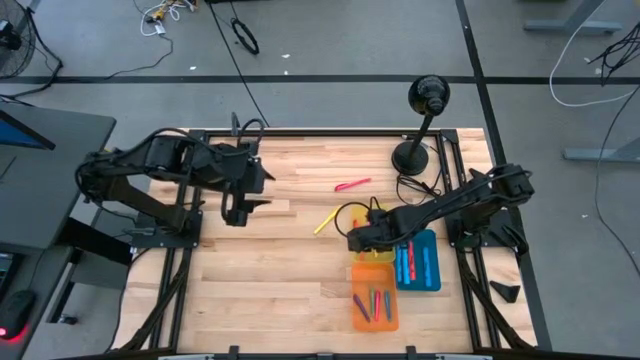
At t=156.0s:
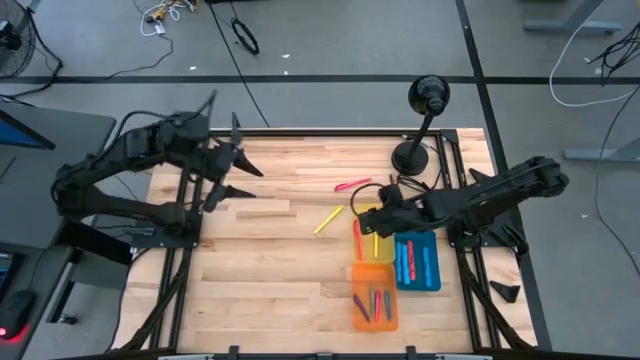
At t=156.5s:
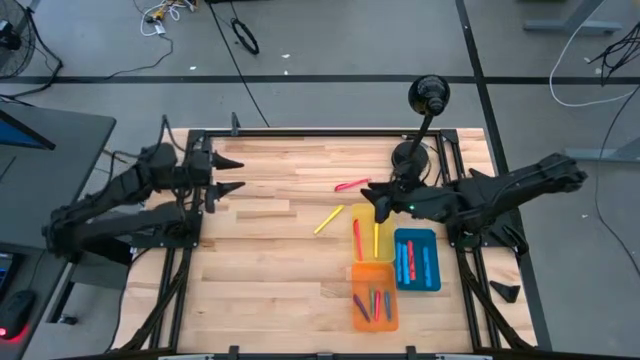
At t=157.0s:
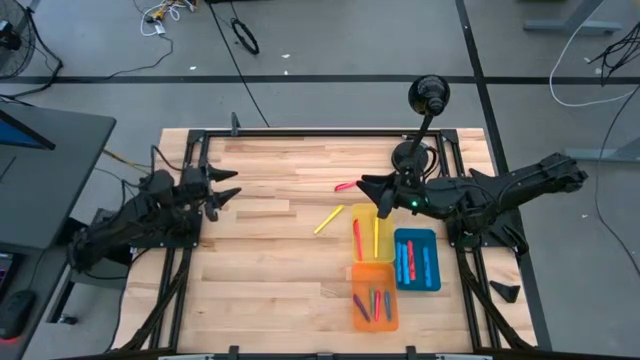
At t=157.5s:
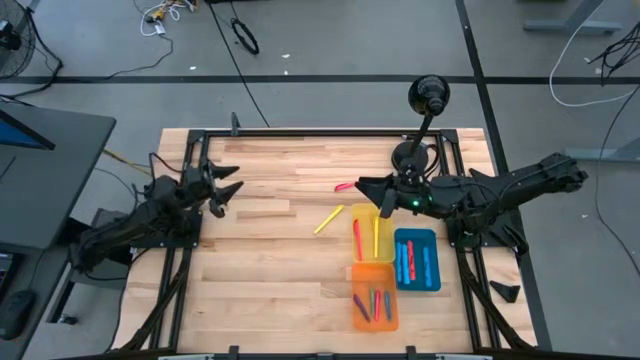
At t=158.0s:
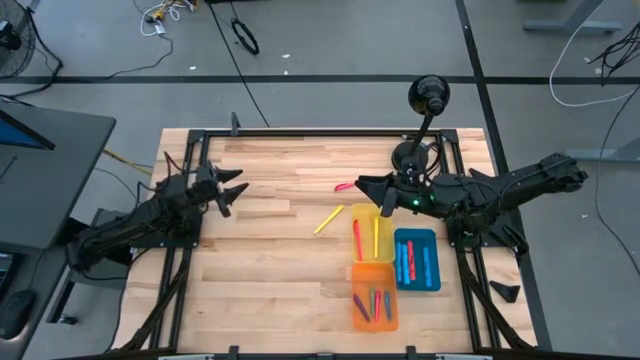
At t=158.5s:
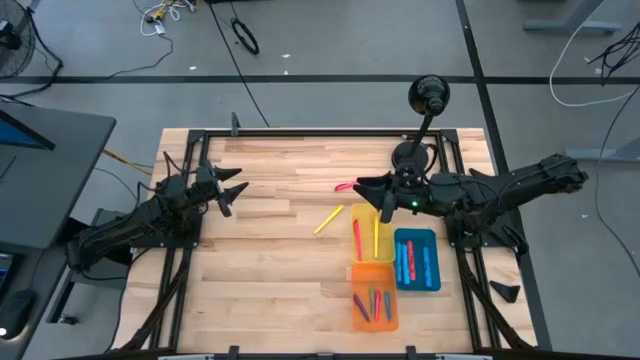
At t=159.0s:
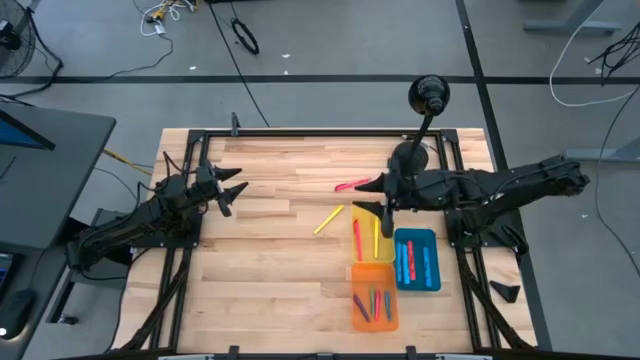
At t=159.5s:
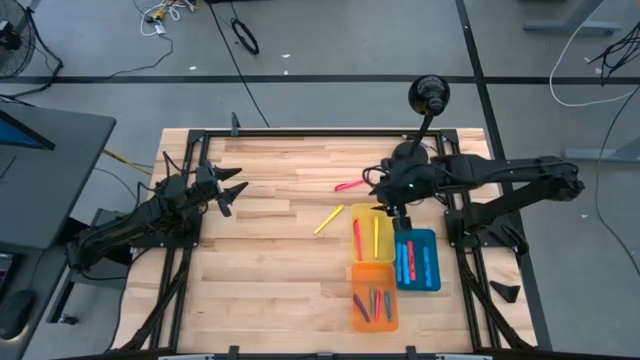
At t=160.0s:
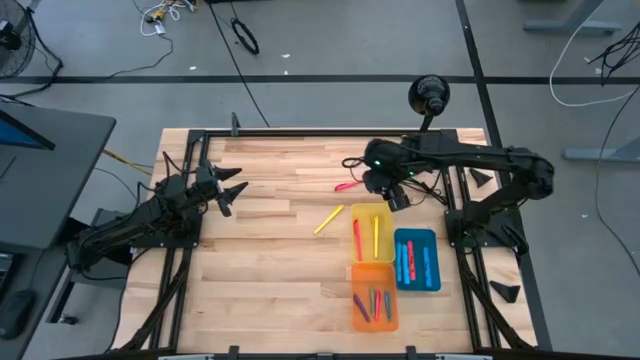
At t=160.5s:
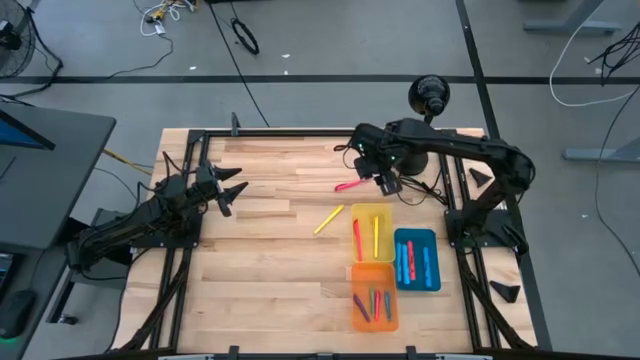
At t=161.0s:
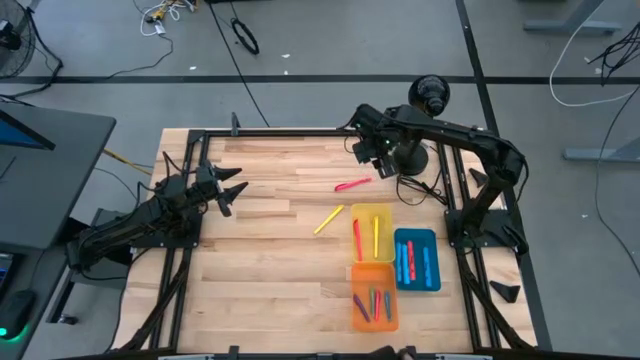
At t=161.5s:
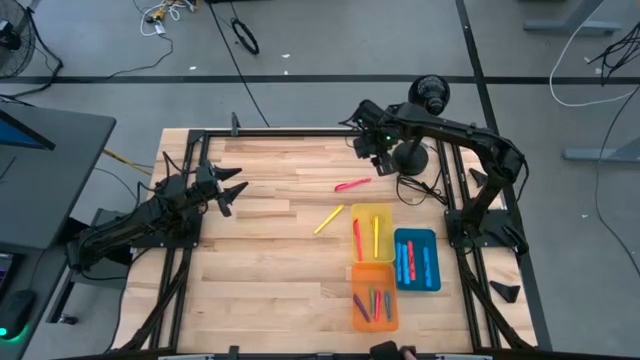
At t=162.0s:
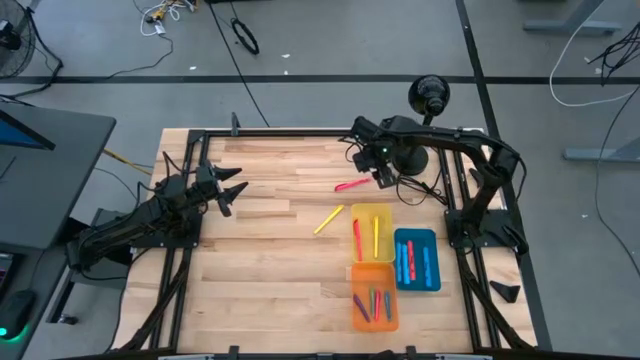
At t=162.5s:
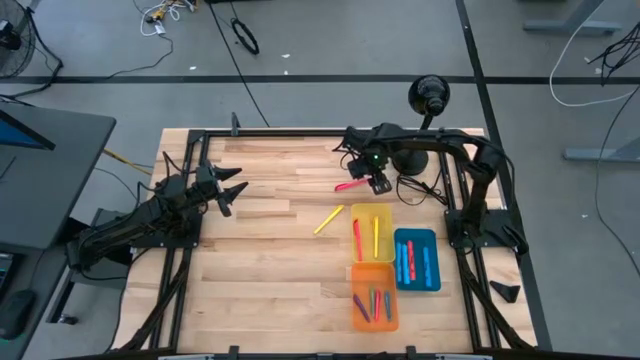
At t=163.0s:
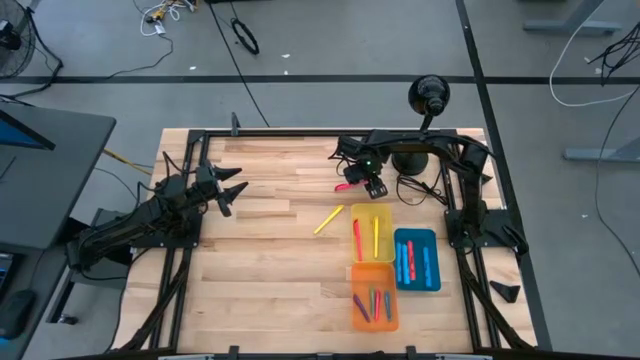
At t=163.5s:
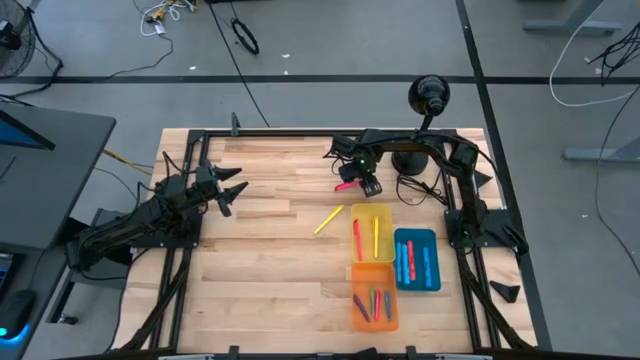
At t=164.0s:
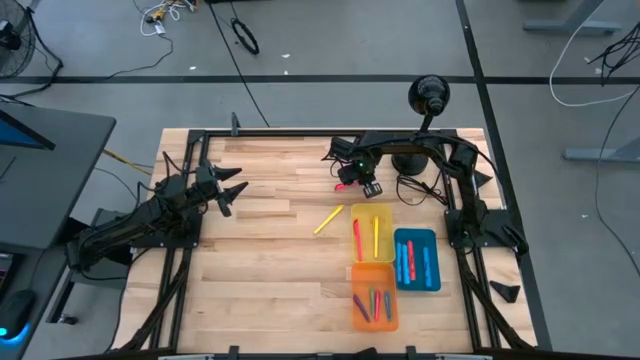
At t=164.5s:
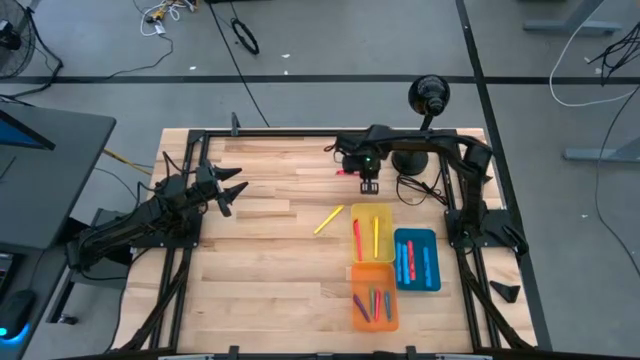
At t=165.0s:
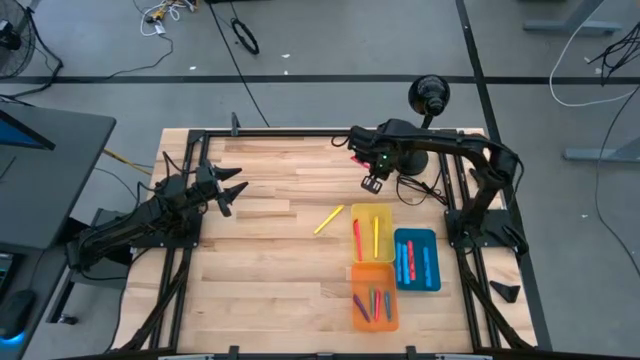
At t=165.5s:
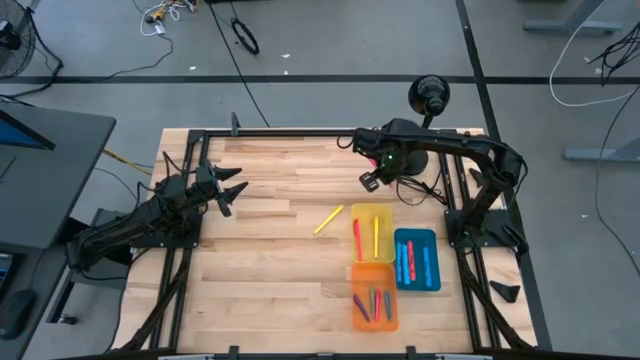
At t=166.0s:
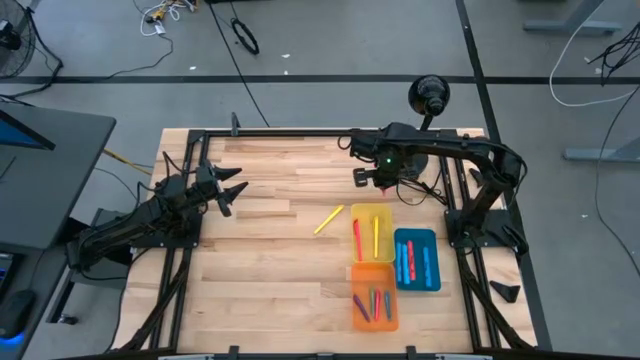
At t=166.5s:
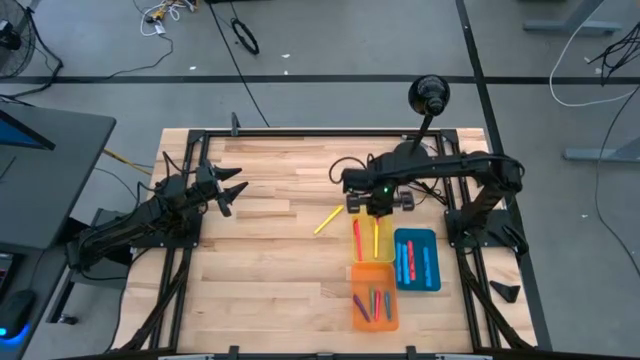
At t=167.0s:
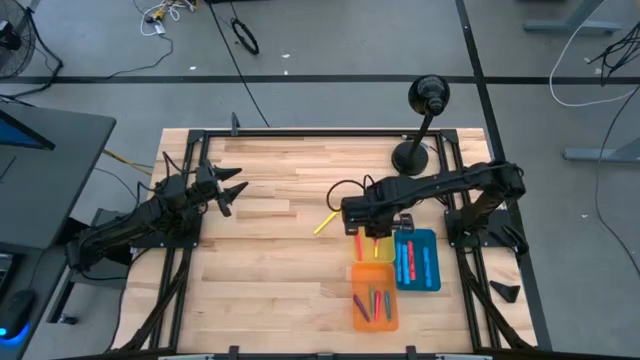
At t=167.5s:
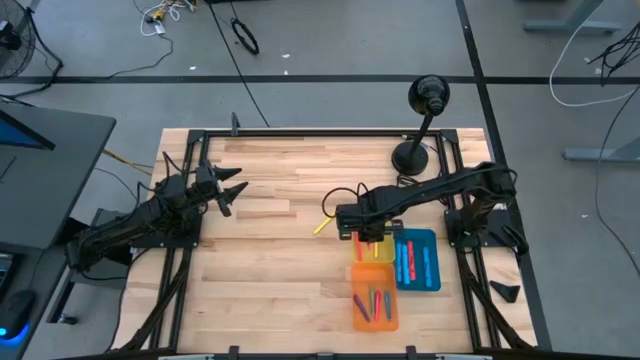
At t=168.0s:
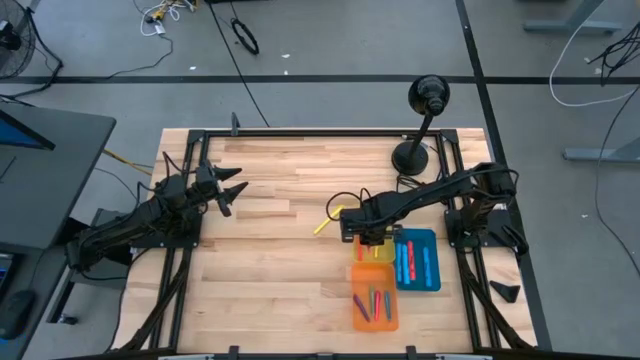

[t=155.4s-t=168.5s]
Task: Pick & Place Markers
Put the pink pen into the yellow bin

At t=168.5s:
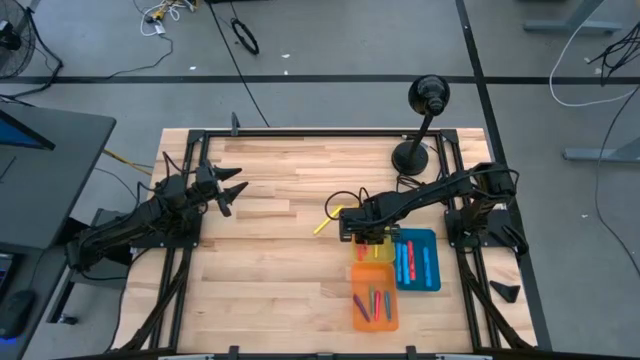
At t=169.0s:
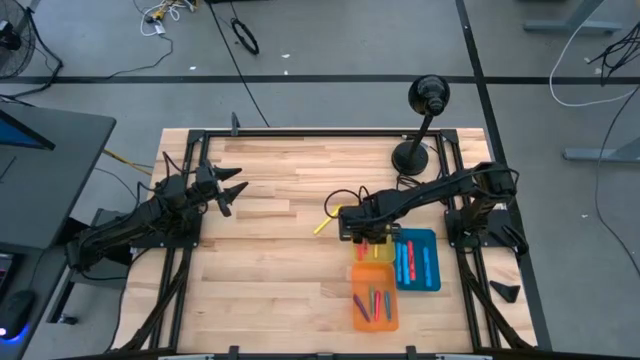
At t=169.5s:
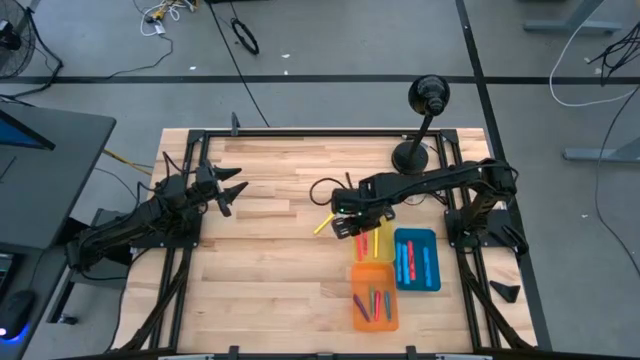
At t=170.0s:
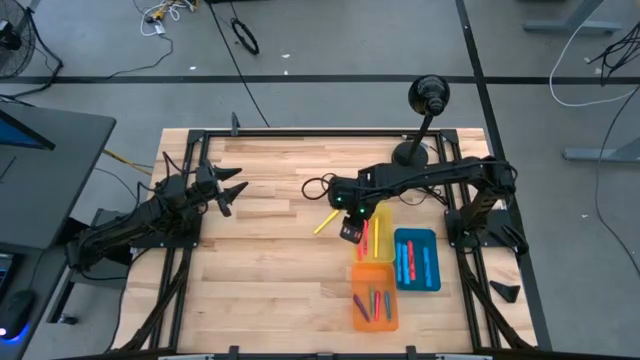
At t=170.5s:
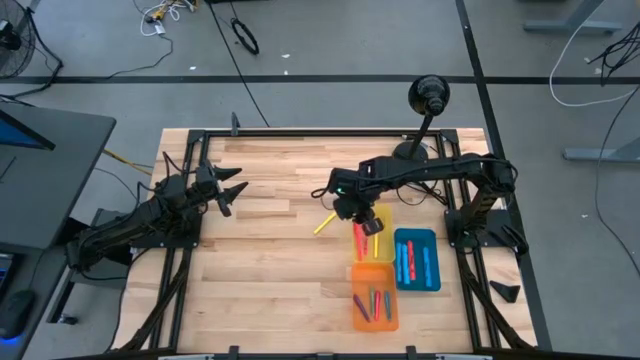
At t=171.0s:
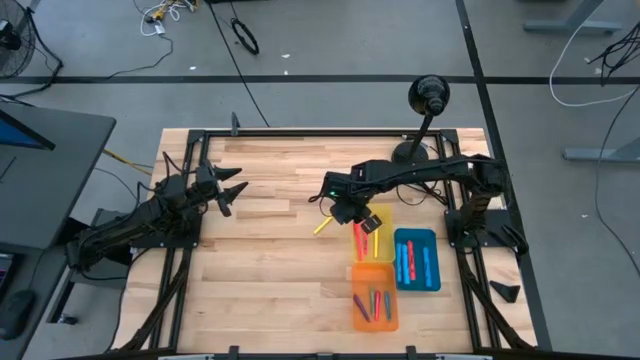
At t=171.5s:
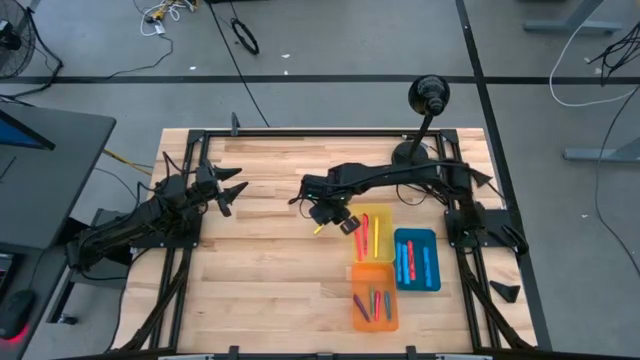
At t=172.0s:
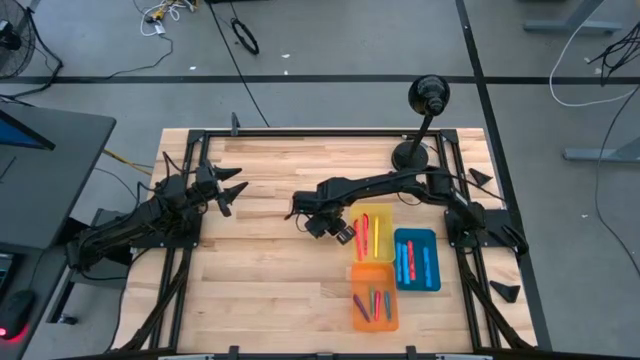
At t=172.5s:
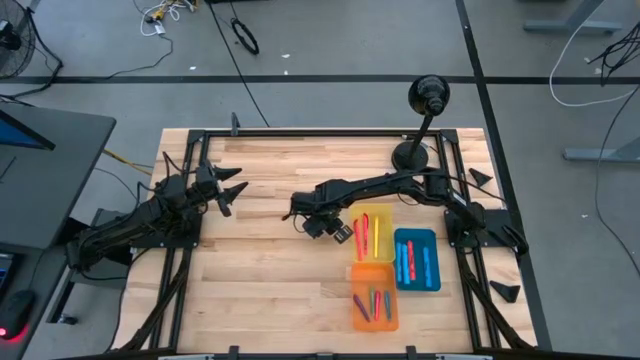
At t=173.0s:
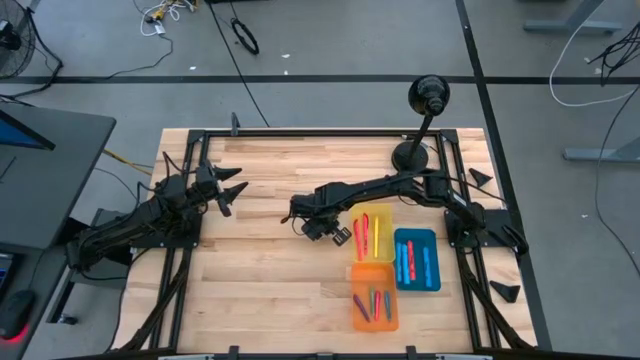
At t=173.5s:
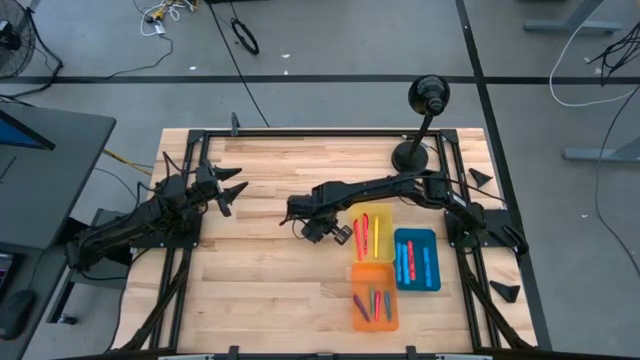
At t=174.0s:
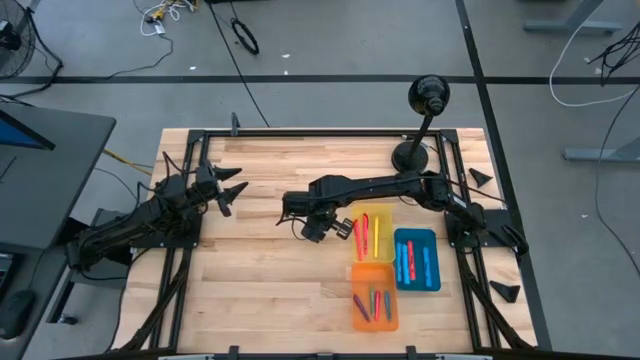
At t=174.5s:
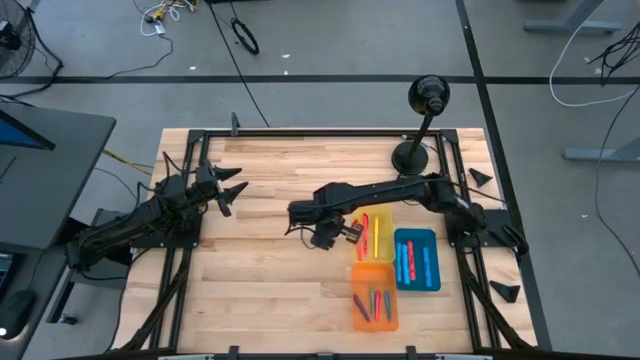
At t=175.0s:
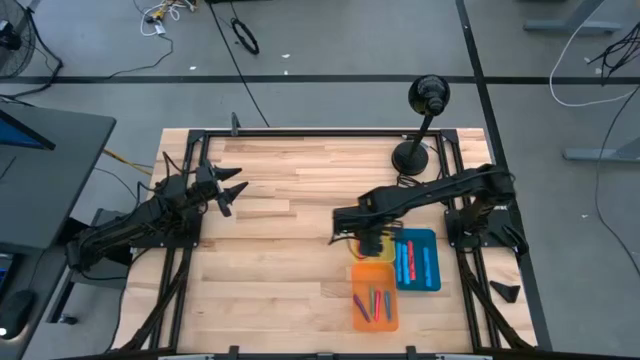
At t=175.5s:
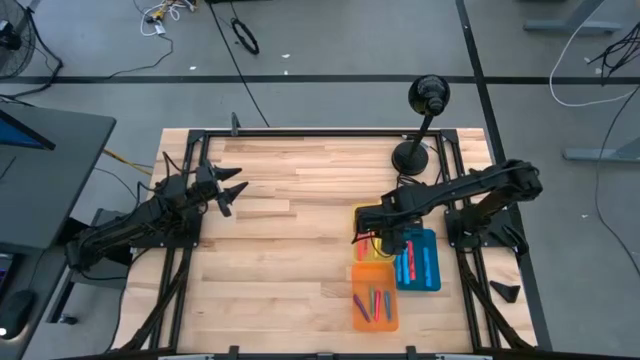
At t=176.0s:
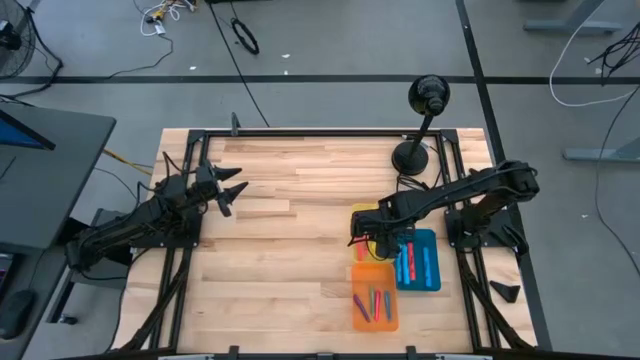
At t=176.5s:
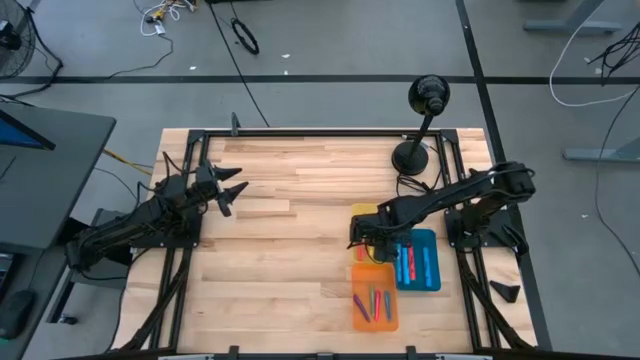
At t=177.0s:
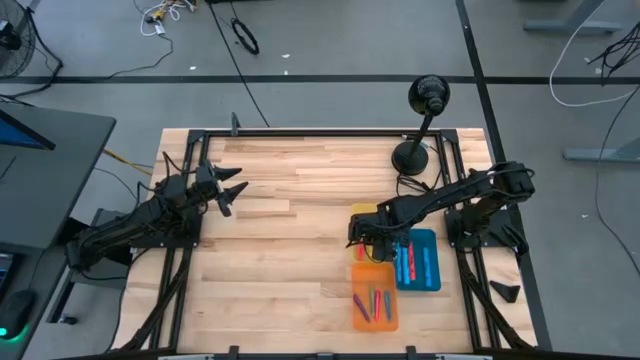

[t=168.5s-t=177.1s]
Put the yellow pen into the yellow bin

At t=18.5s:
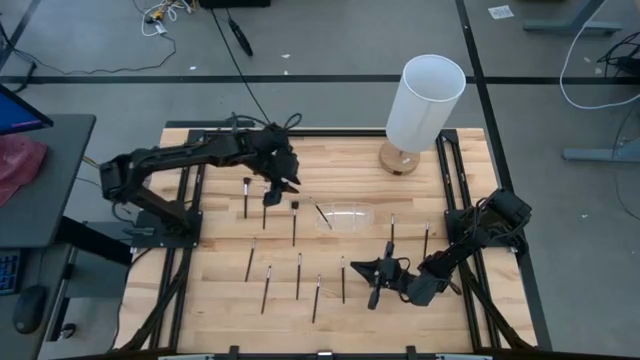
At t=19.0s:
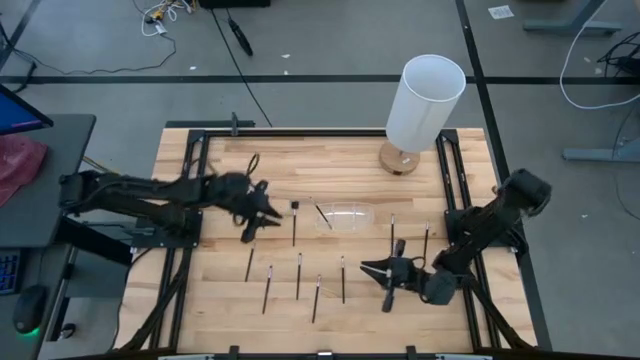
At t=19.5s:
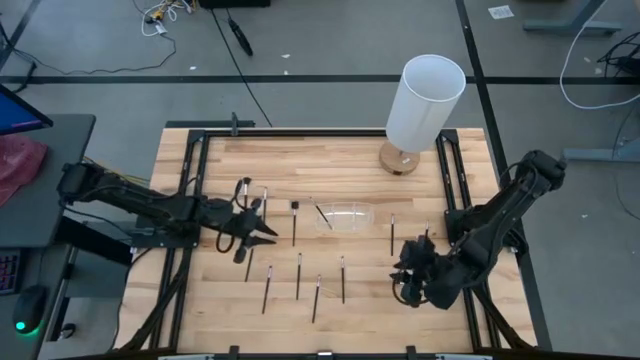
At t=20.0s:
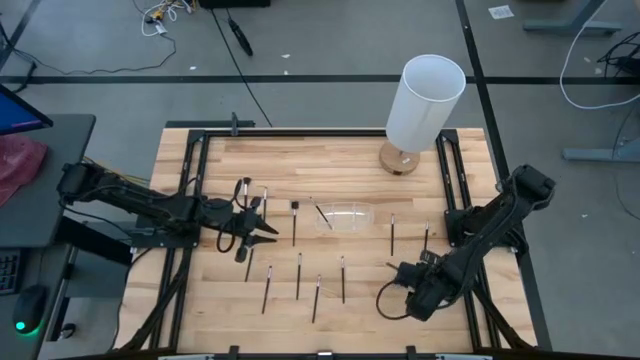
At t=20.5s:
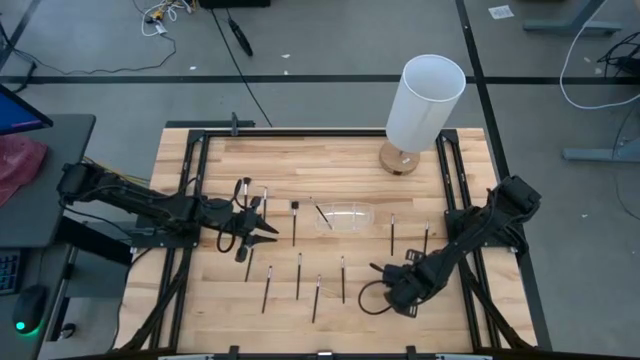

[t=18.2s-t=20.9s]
Task: Pick & Place Makeup Supplies
Put the black makeup brush into the transparent organizer
